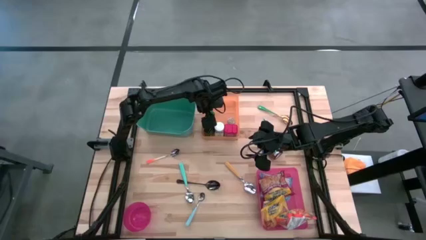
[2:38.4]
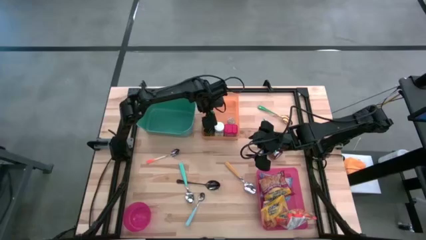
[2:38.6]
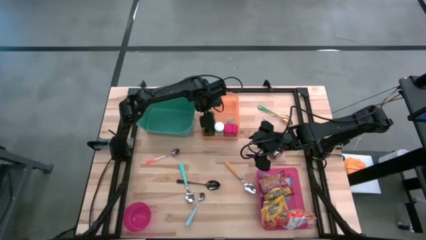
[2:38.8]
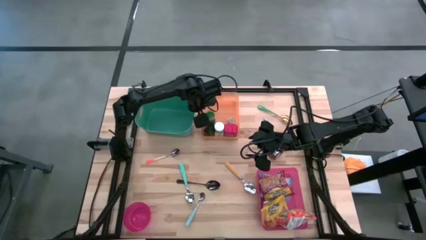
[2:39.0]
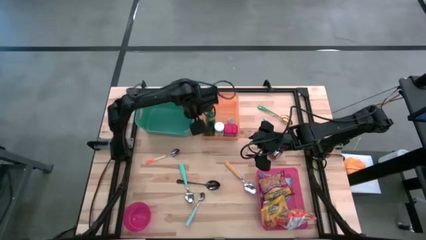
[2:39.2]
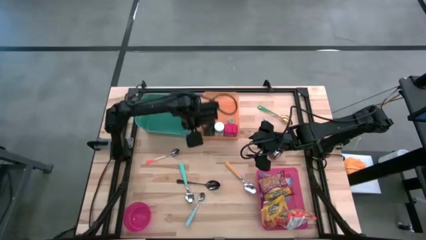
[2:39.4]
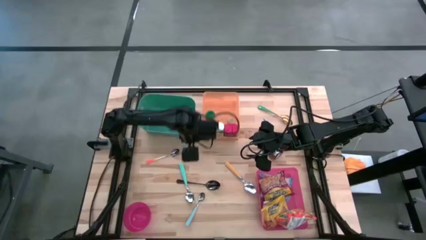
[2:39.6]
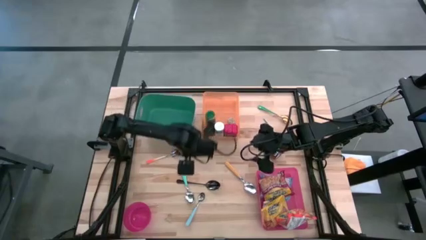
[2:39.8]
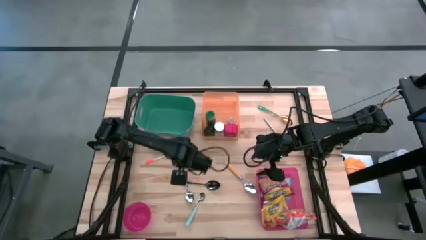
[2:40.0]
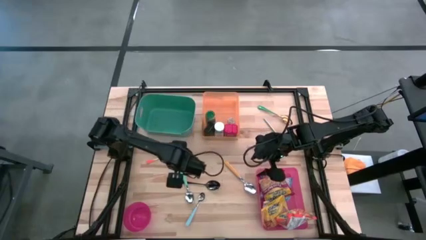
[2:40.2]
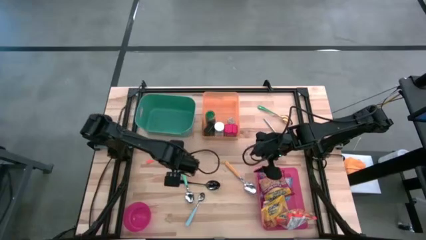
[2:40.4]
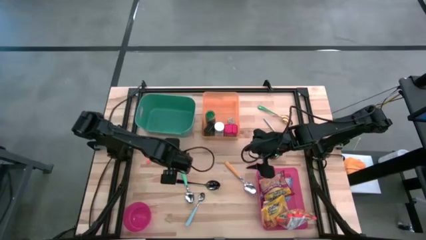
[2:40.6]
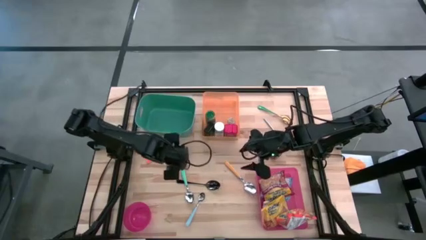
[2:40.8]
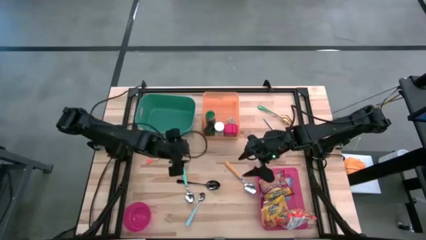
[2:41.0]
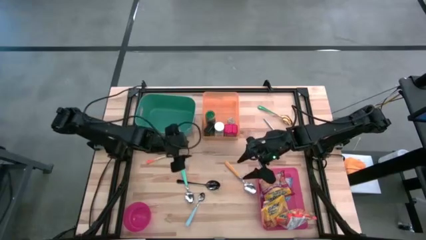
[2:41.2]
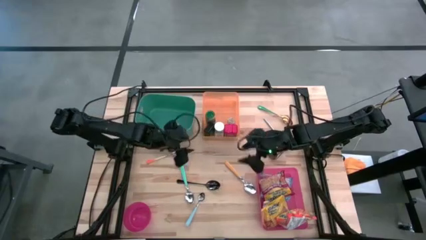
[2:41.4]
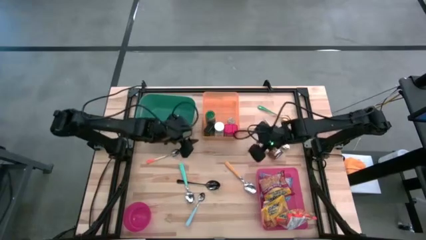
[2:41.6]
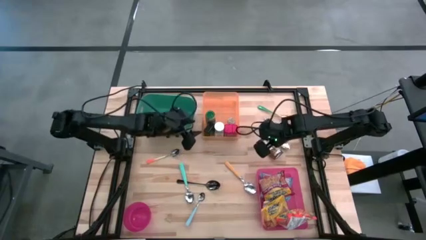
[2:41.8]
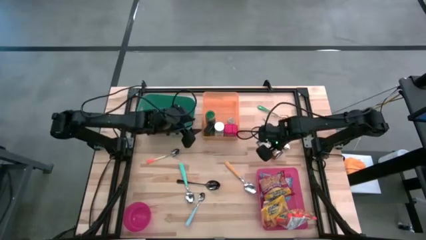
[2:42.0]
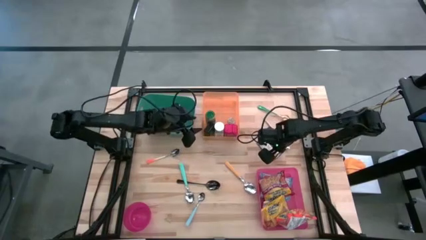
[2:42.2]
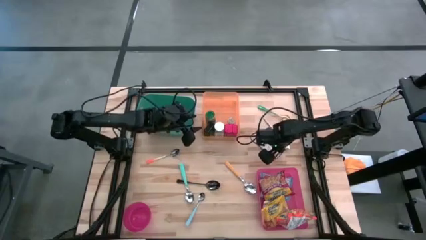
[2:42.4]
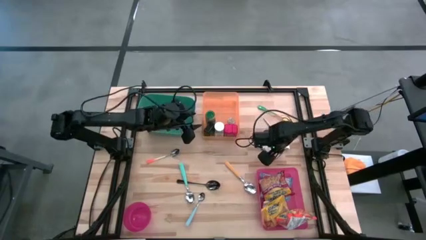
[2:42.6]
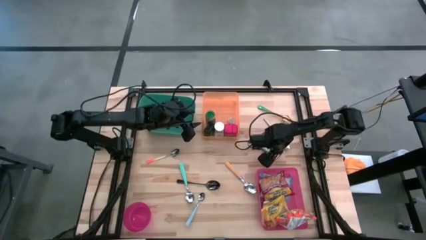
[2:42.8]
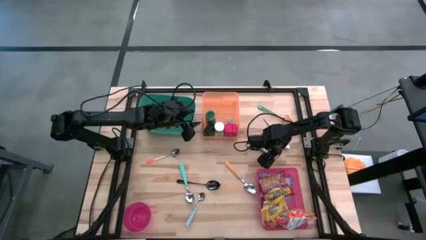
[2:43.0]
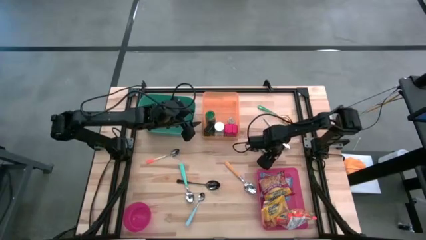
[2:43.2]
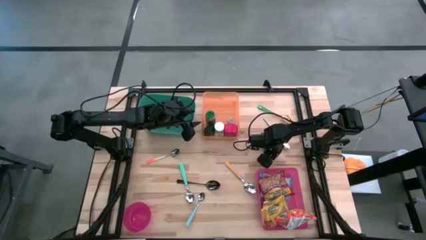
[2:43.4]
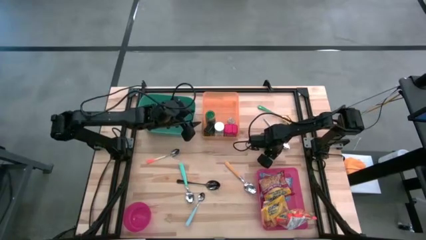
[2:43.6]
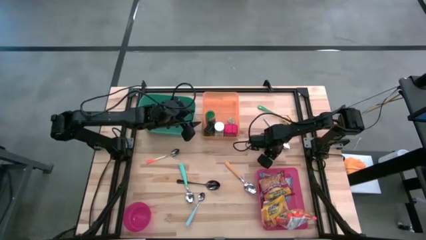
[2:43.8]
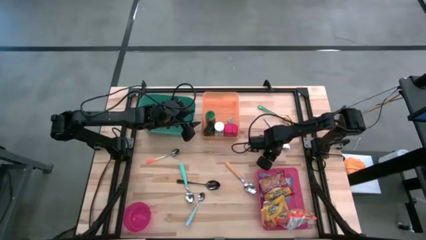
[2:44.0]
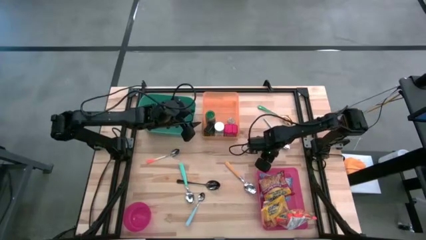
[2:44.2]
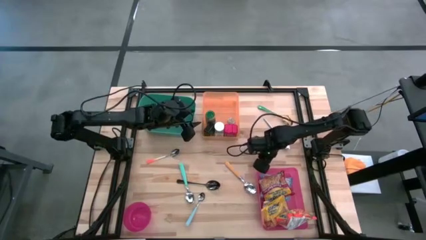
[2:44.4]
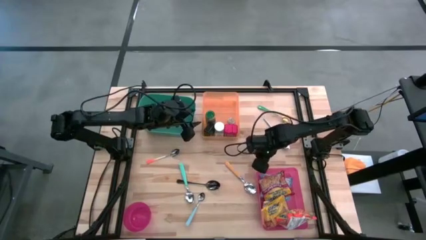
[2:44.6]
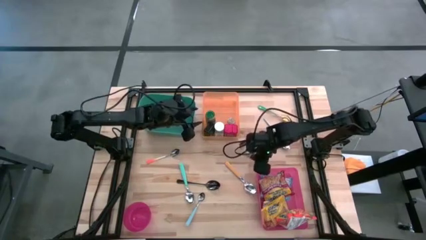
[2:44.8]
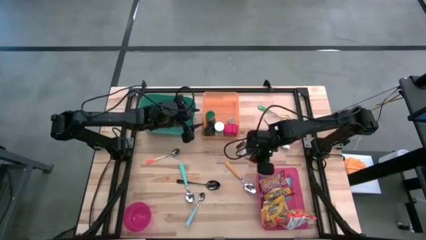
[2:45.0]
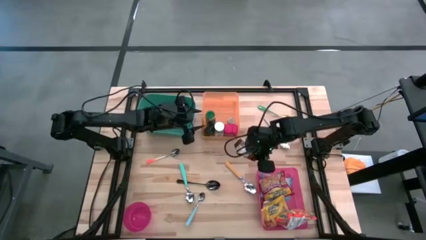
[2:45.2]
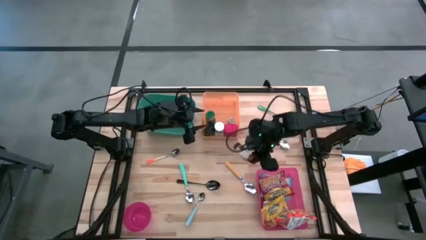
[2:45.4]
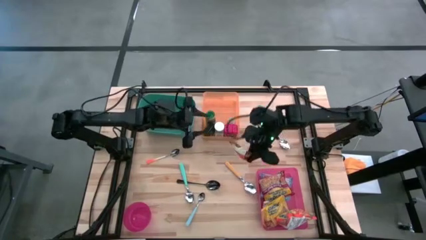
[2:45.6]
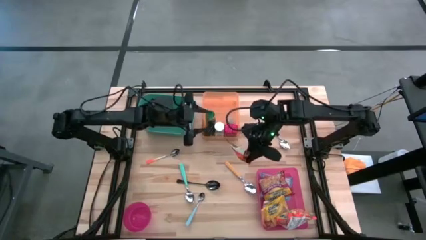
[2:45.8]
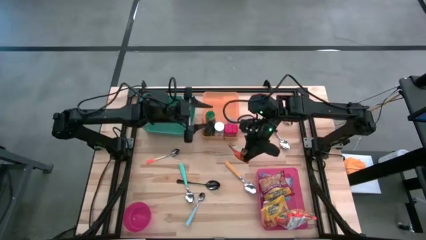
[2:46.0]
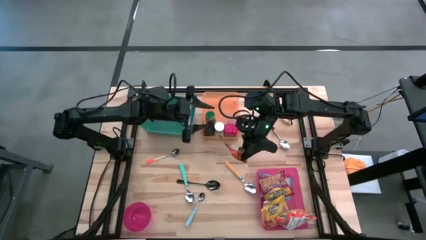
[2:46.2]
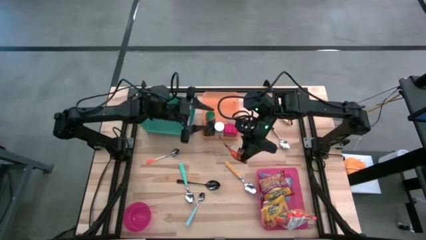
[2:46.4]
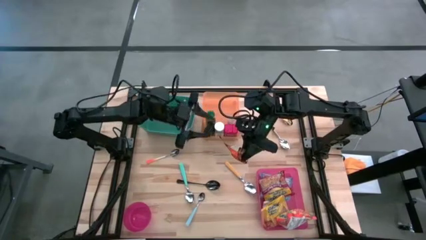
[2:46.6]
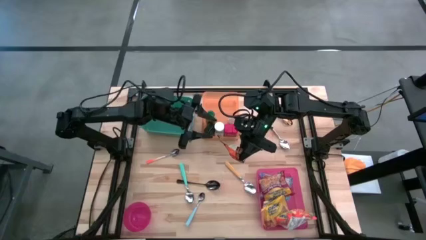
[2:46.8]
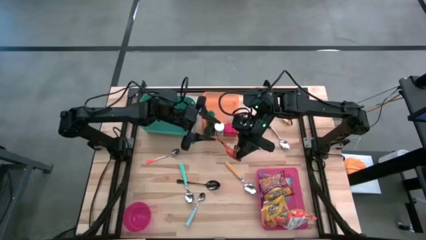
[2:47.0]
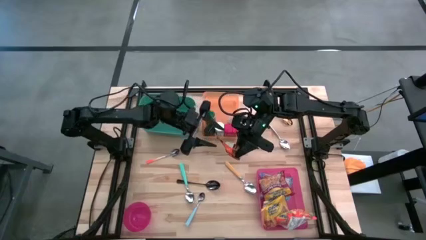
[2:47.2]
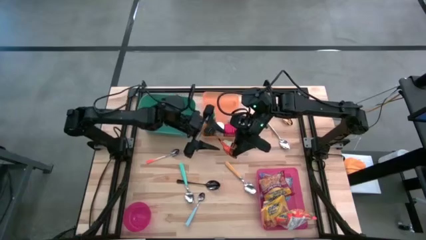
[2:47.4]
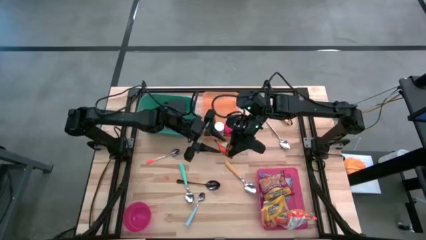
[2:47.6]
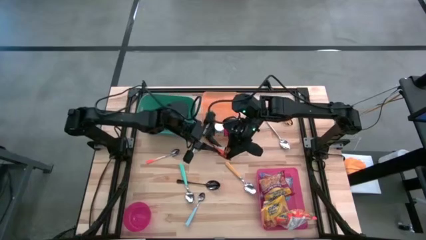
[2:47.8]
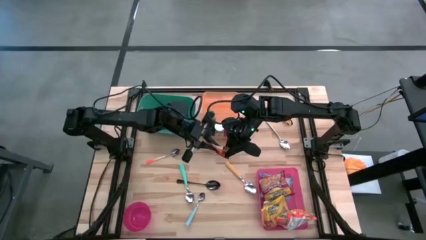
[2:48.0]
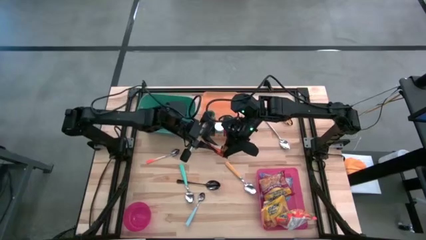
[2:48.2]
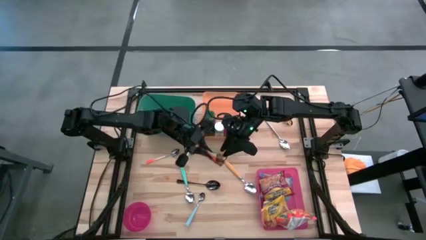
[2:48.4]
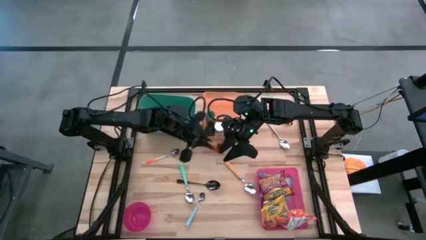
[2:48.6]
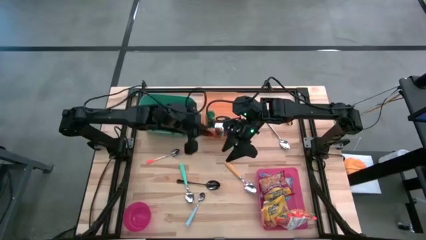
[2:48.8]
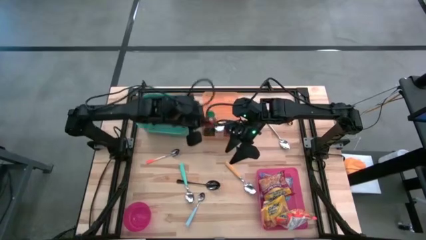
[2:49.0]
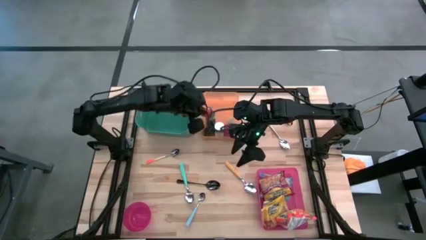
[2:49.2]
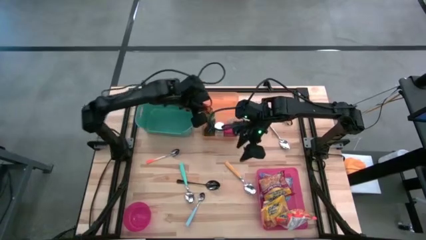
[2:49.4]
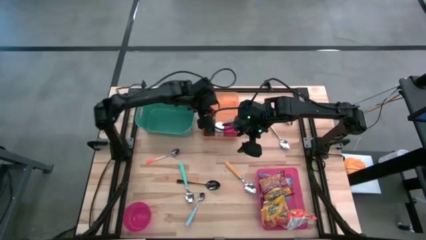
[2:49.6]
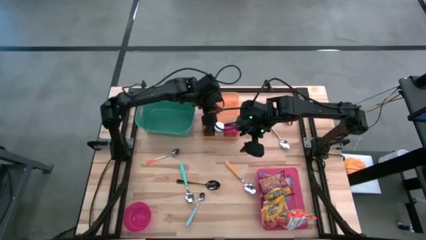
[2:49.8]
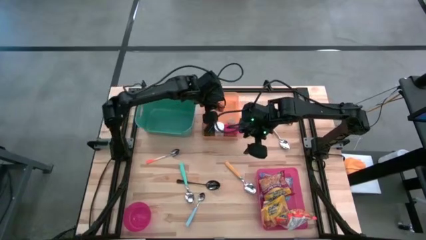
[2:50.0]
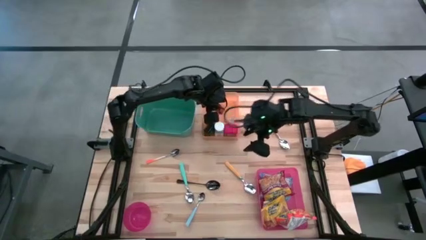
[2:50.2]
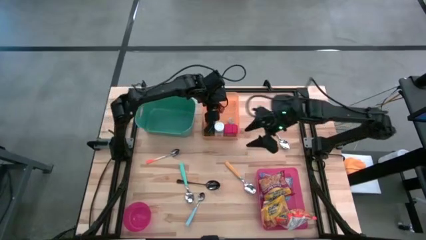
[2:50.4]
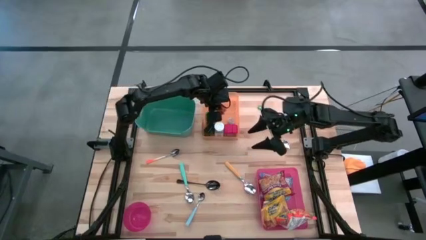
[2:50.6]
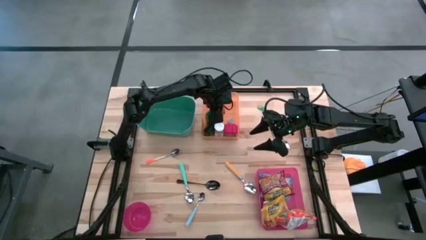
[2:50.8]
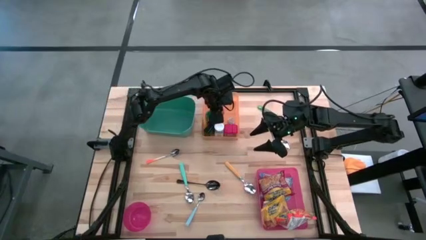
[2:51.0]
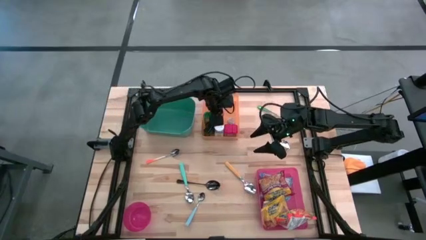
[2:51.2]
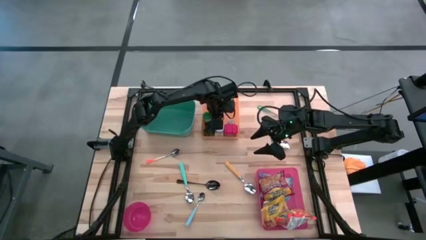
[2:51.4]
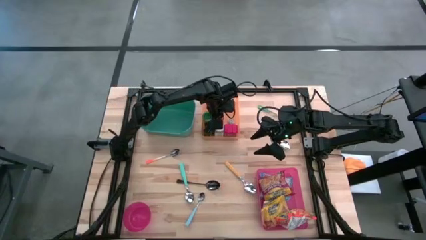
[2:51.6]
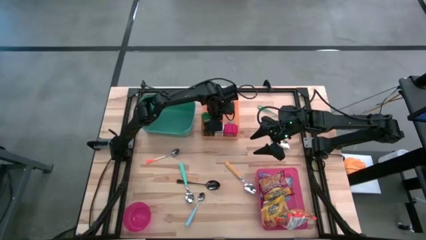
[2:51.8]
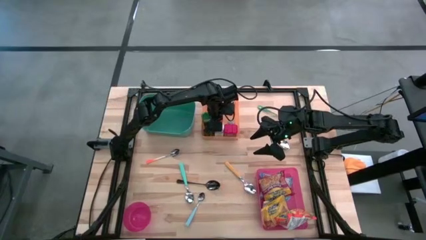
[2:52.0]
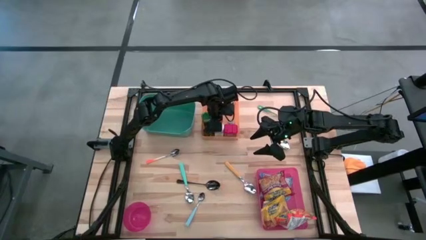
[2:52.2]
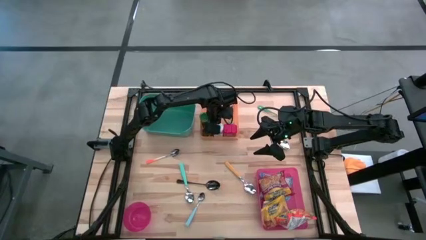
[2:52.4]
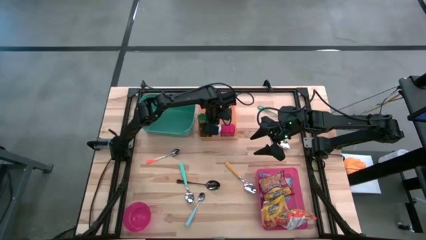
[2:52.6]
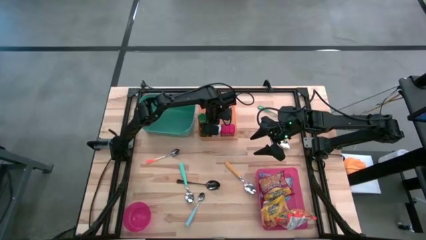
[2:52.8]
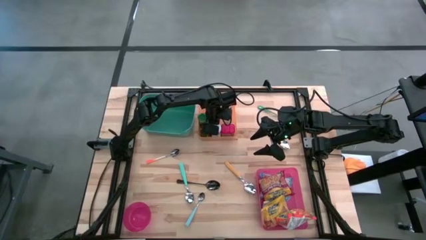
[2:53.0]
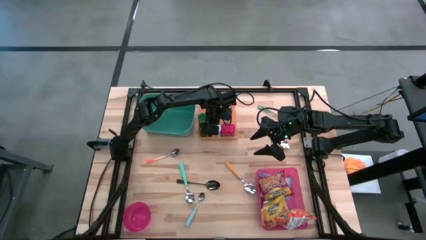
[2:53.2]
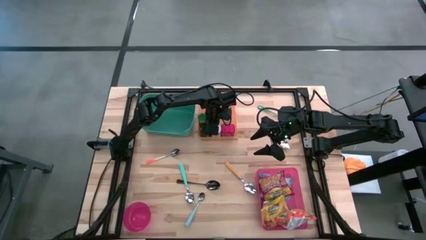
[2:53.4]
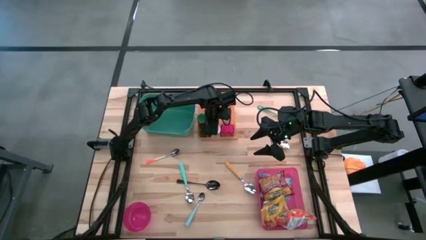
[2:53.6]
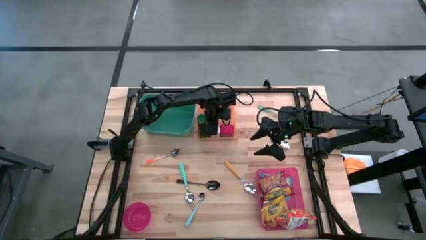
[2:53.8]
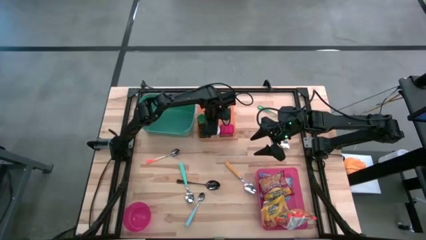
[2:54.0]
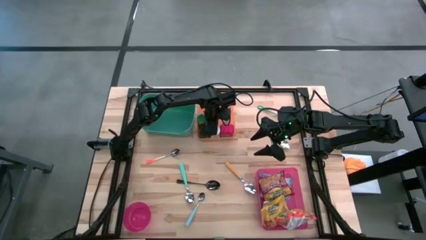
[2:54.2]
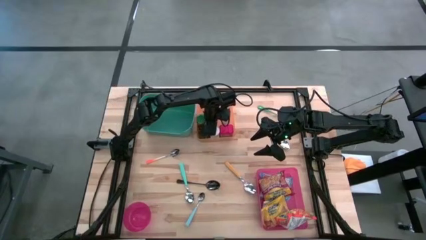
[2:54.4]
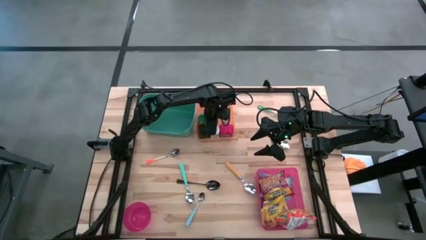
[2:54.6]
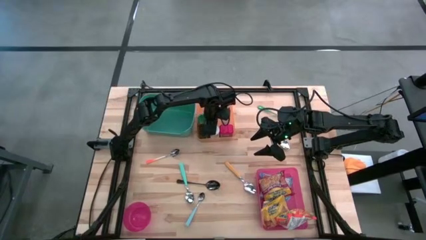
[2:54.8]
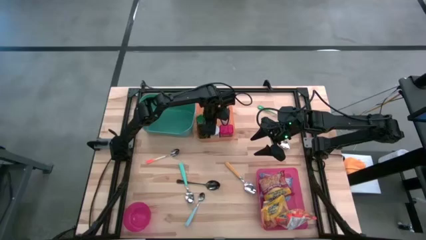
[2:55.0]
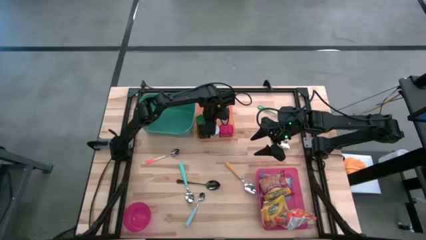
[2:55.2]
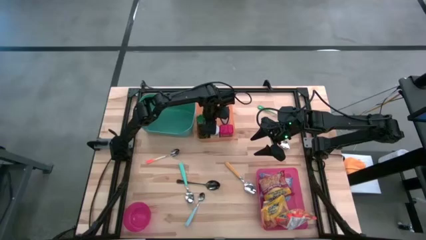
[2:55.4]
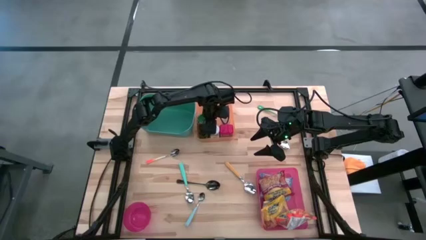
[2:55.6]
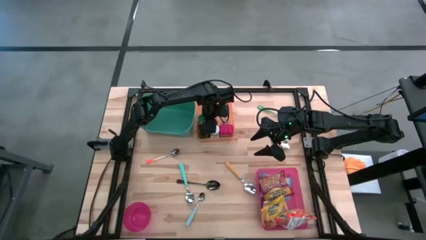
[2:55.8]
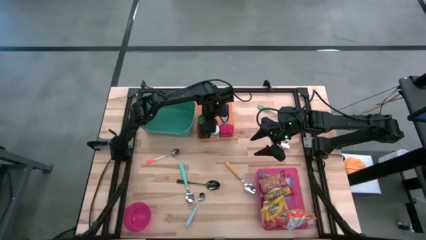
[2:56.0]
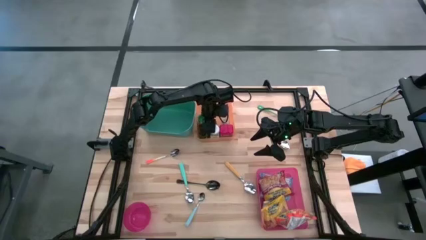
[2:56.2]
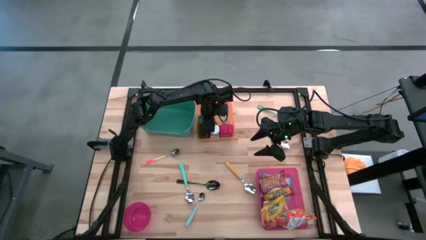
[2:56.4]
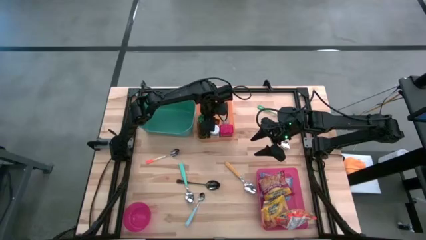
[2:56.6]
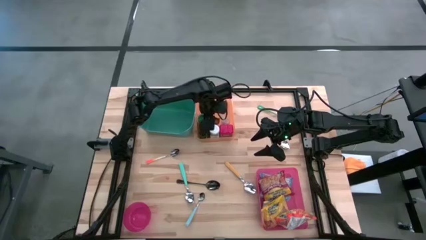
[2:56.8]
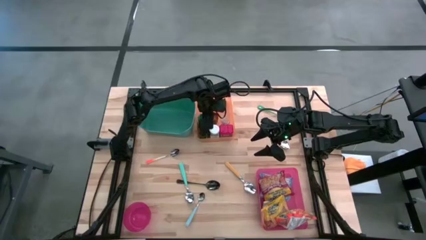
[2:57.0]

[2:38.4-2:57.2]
Put the orange seasoning pack into the orange bin
